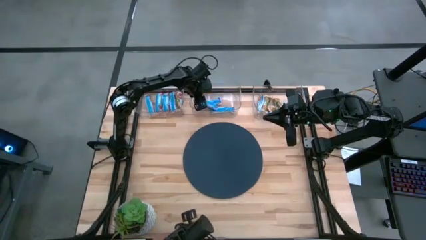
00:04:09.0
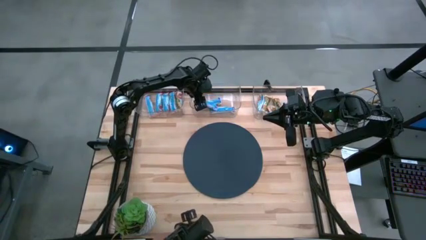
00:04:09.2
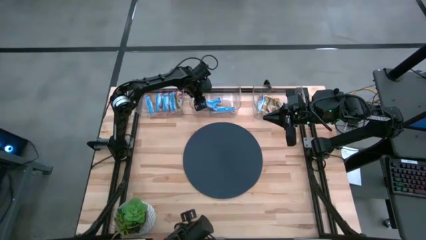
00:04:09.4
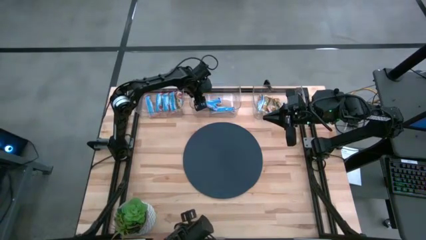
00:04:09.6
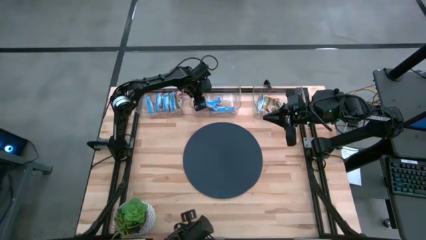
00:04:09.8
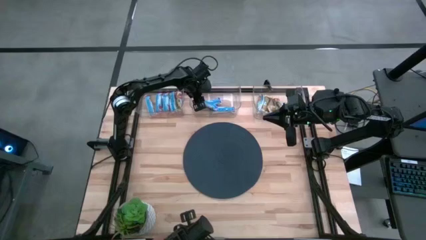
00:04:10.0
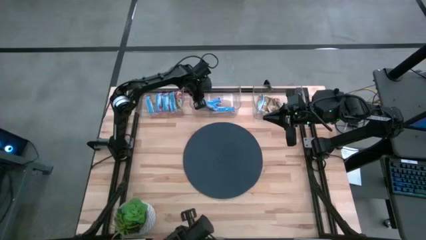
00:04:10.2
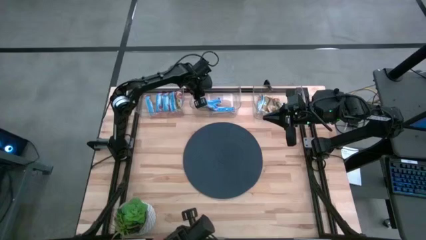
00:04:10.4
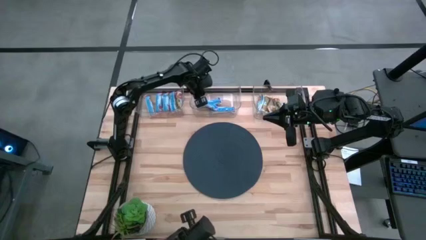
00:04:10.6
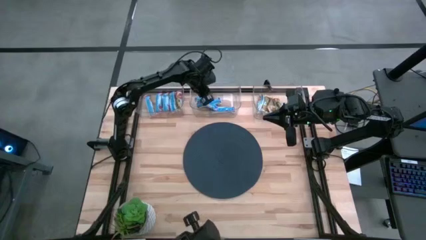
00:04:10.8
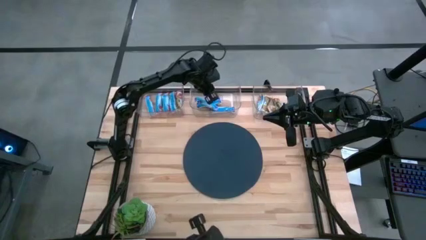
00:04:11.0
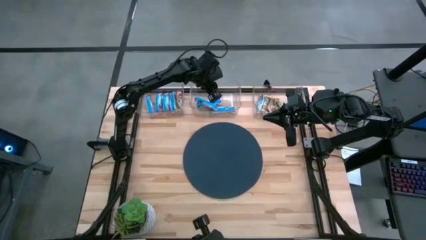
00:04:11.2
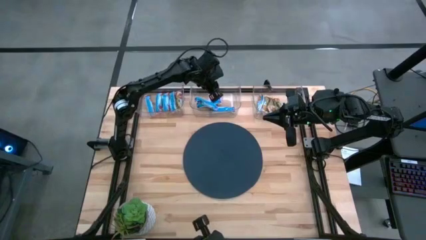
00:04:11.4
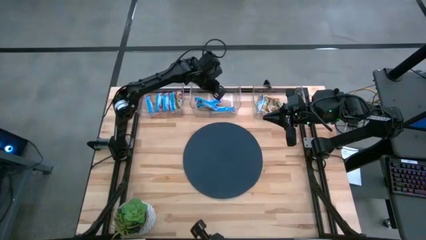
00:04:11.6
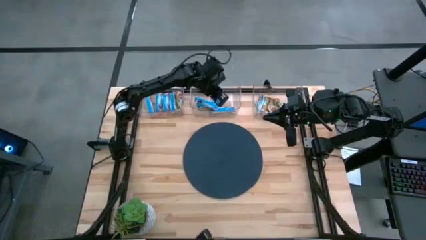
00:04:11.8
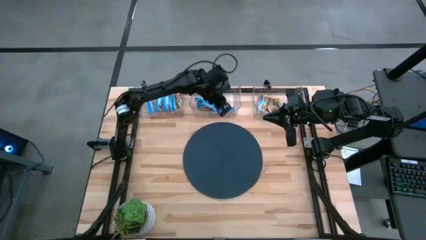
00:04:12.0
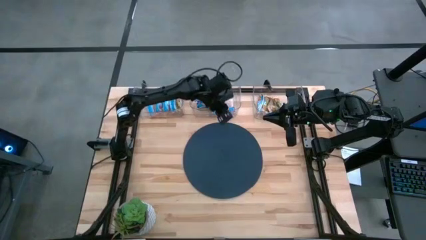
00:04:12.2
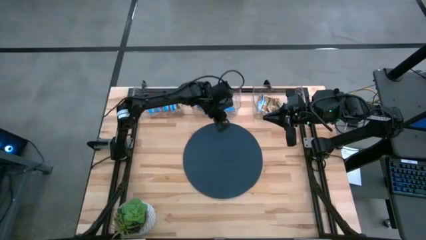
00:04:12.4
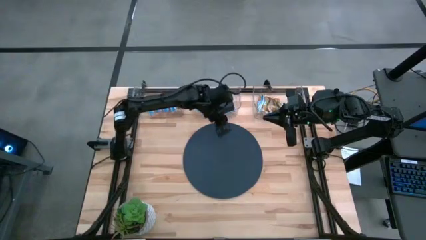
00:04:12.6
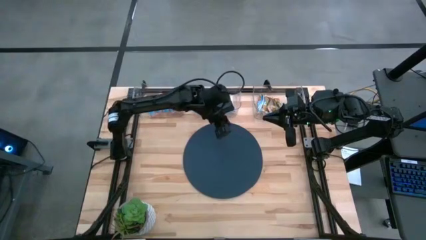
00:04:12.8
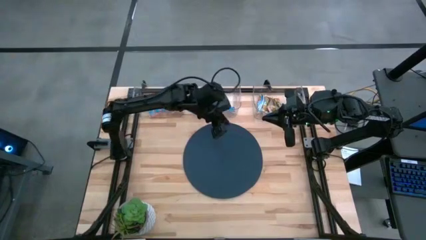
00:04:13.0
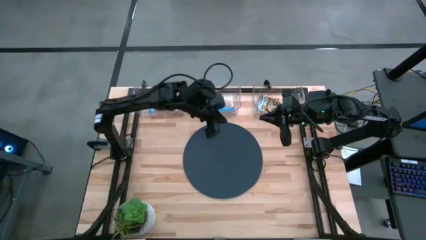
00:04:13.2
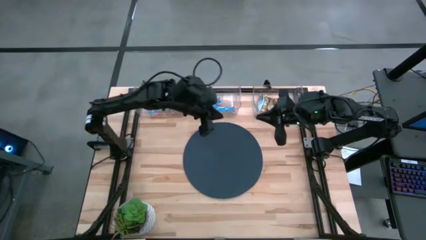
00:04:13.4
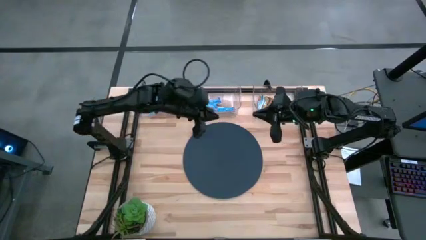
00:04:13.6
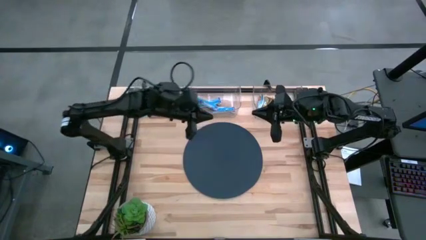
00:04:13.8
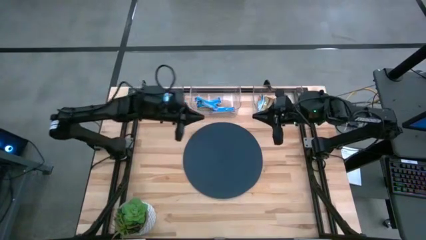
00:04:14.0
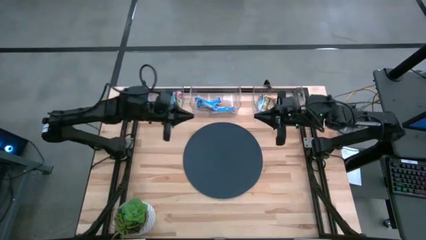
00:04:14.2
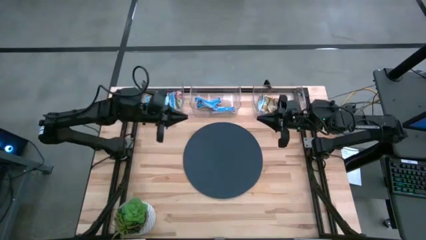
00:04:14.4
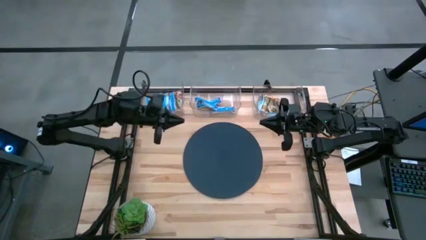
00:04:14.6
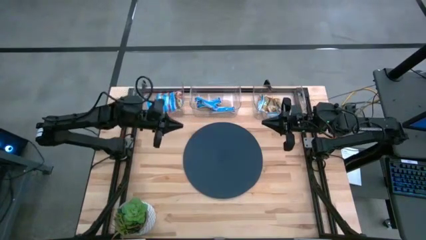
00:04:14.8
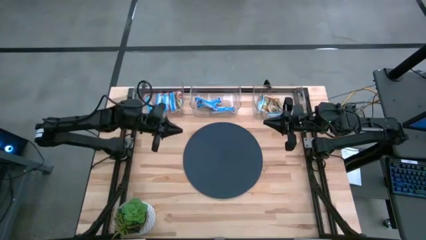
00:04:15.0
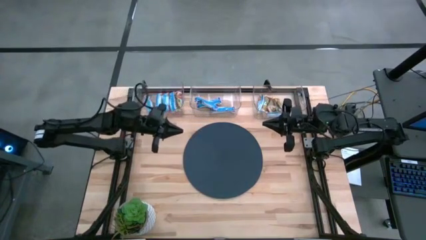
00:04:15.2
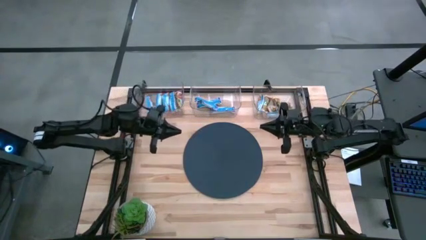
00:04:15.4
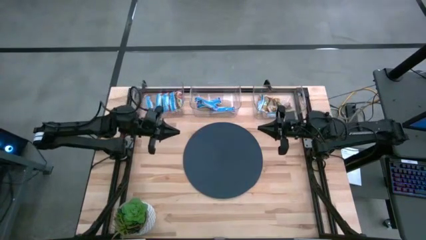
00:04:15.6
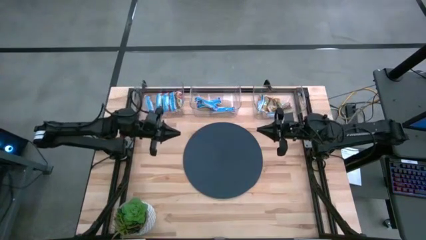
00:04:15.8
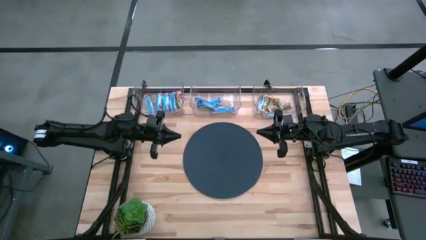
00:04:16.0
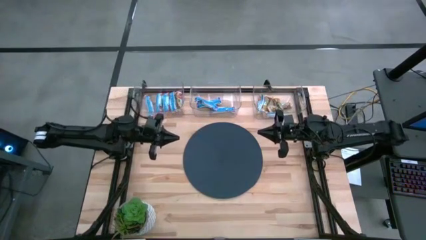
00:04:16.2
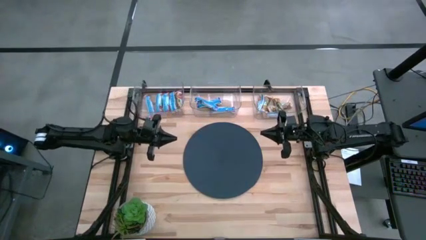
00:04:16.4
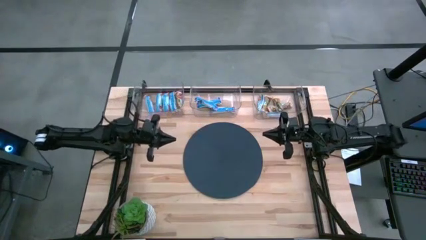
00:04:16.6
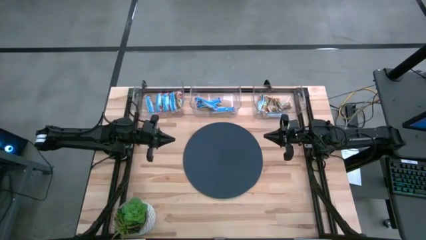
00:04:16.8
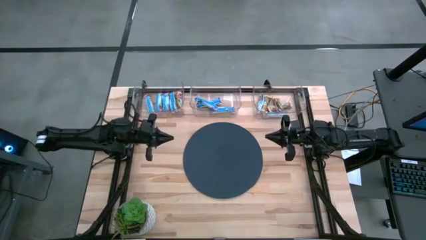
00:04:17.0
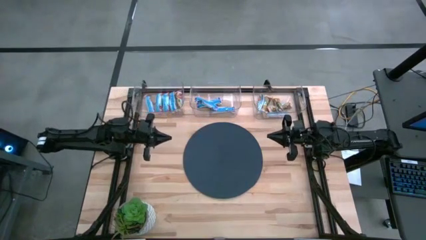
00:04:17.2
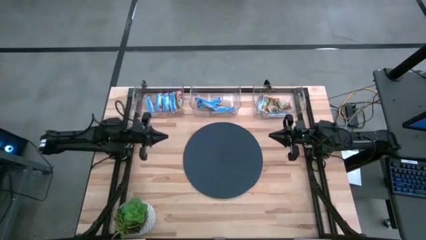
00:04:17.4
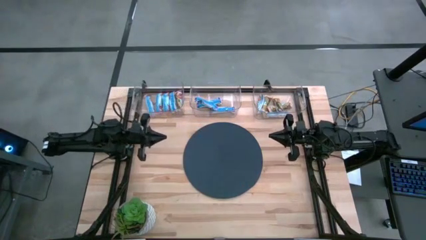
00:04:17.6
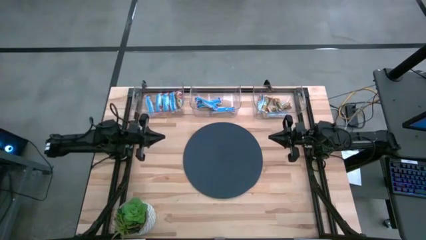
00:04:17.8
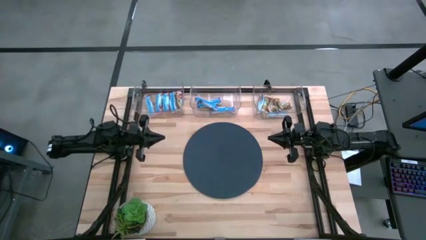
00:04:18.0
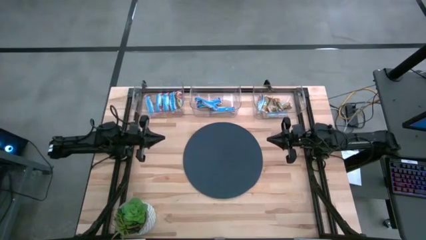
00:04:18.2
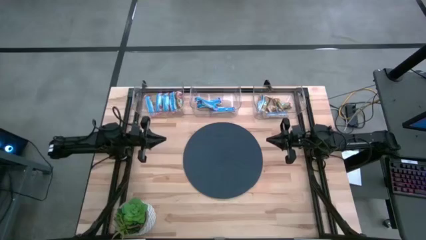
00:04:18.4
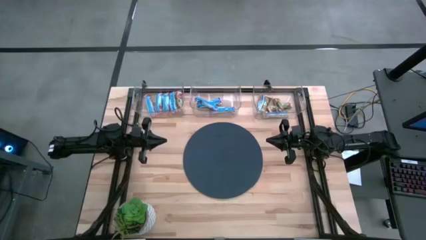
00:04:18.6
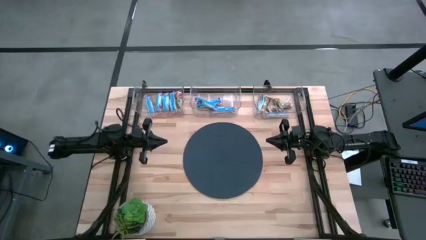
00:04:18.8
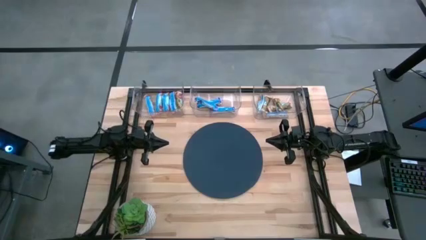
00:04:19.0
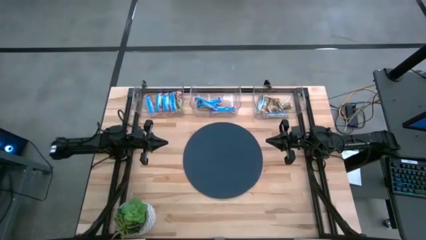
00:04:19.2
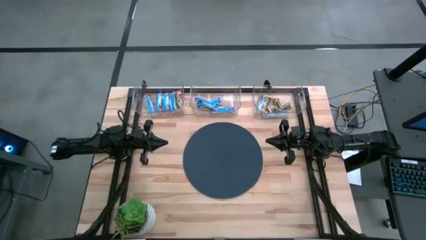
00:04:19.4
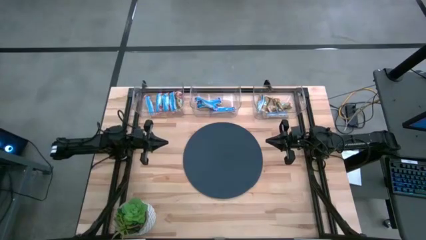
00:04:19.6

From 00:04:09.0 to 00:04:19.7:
Task: Pick and place Granola Bars by type
Return to Home Position
